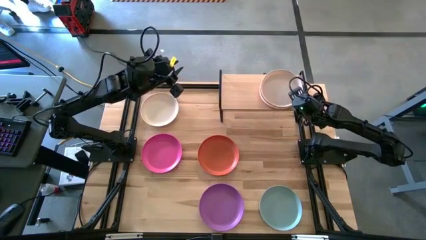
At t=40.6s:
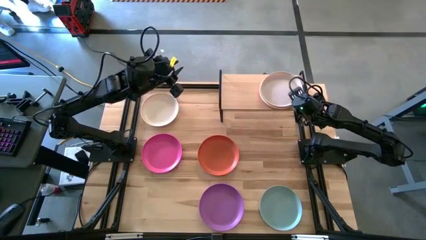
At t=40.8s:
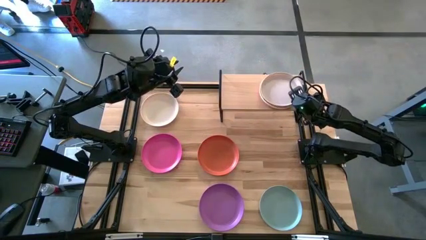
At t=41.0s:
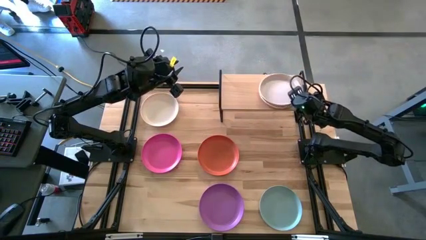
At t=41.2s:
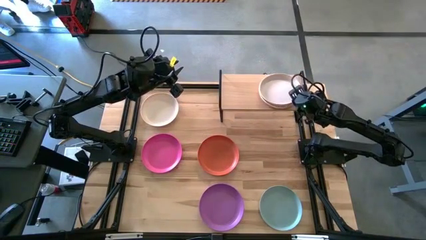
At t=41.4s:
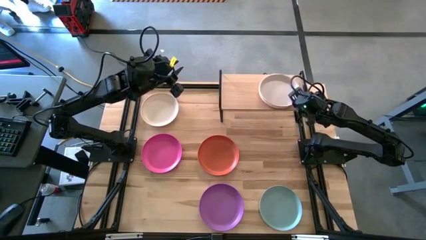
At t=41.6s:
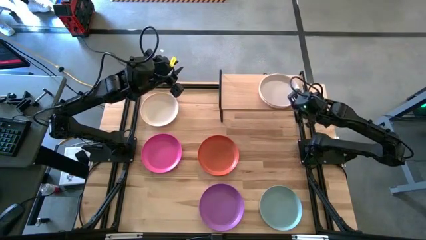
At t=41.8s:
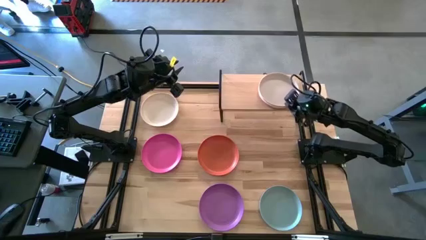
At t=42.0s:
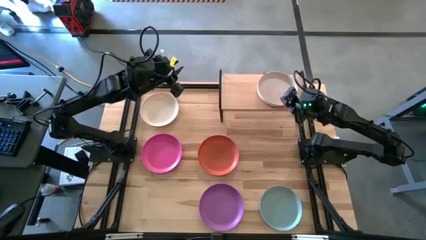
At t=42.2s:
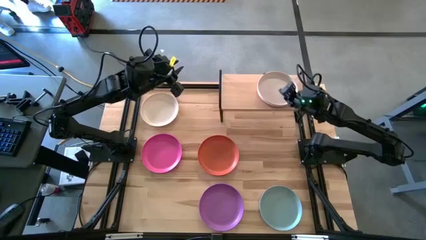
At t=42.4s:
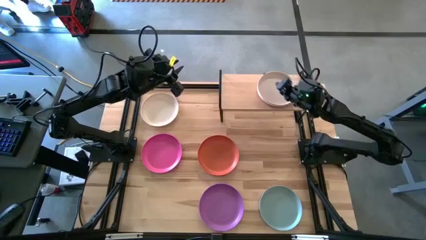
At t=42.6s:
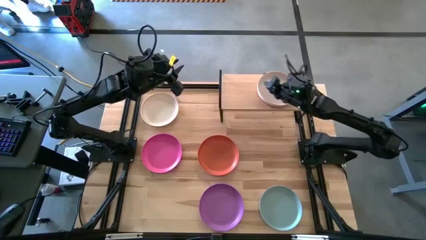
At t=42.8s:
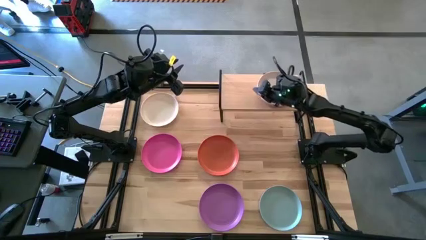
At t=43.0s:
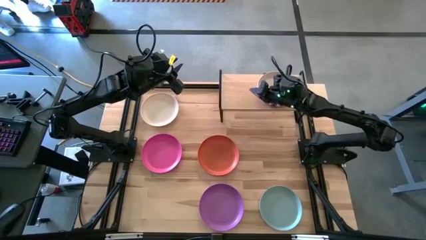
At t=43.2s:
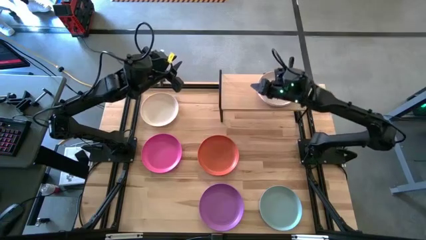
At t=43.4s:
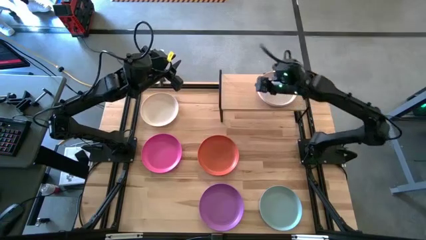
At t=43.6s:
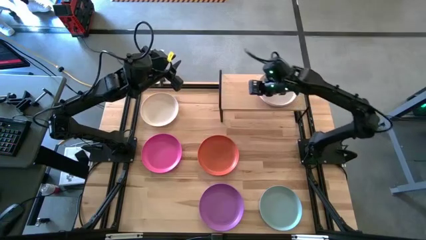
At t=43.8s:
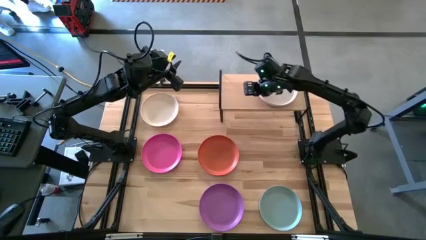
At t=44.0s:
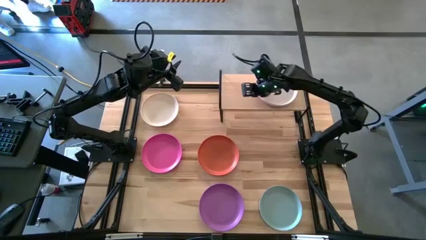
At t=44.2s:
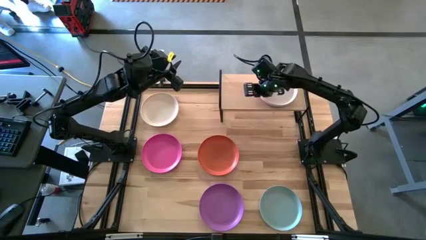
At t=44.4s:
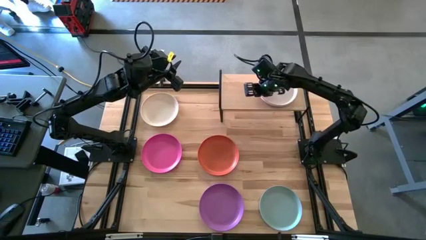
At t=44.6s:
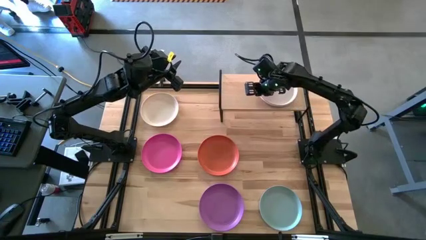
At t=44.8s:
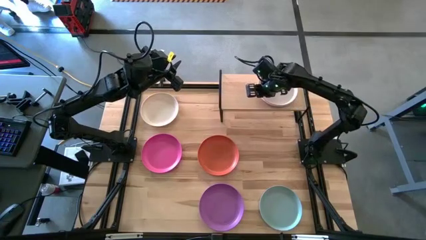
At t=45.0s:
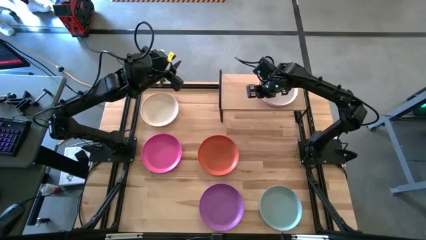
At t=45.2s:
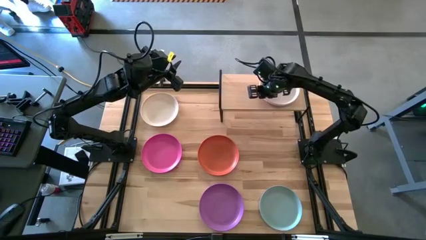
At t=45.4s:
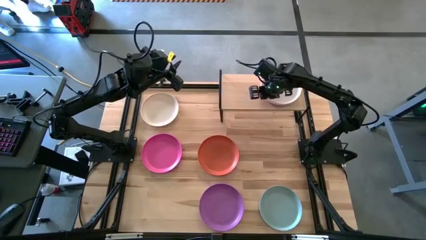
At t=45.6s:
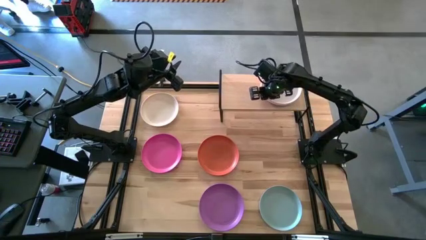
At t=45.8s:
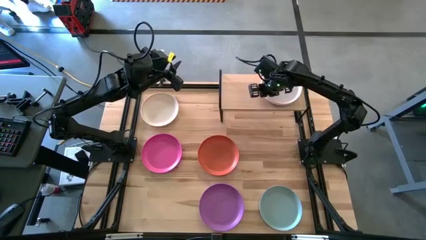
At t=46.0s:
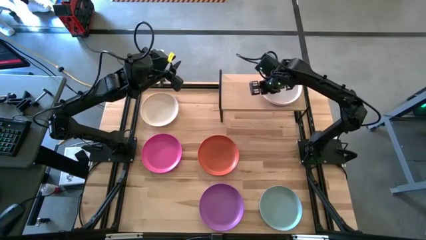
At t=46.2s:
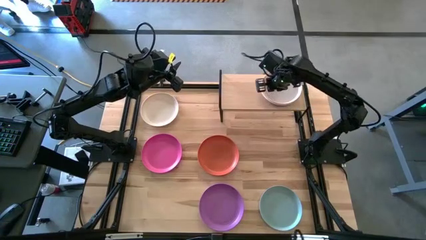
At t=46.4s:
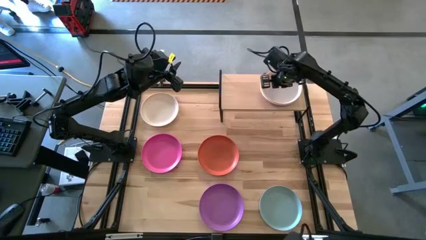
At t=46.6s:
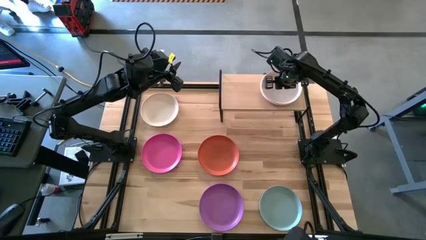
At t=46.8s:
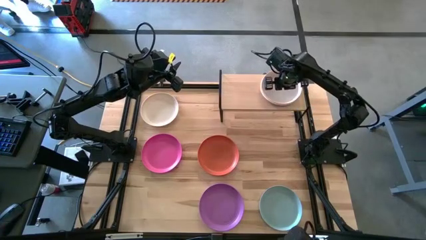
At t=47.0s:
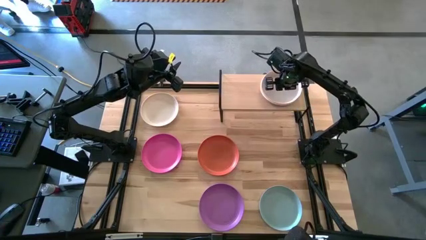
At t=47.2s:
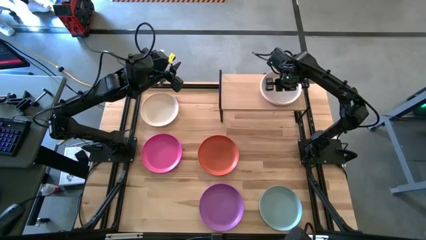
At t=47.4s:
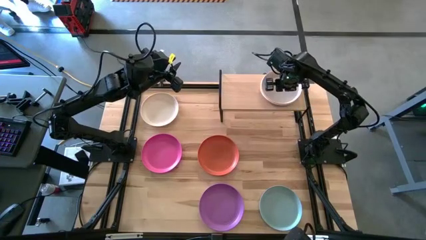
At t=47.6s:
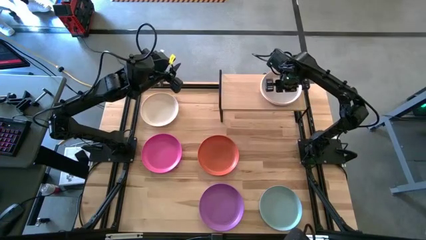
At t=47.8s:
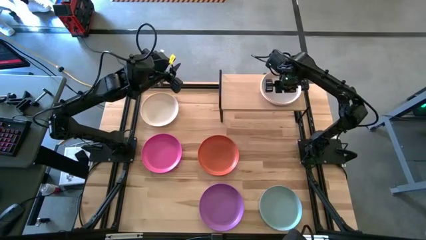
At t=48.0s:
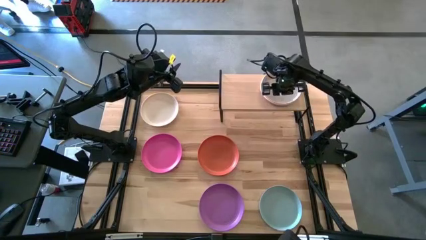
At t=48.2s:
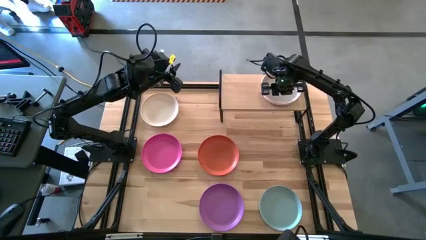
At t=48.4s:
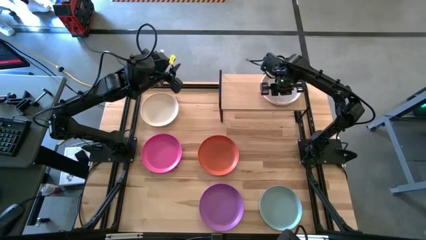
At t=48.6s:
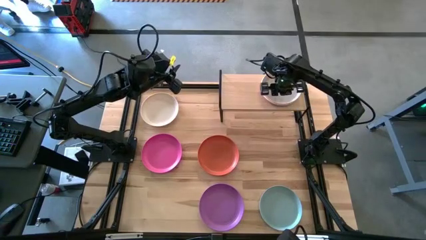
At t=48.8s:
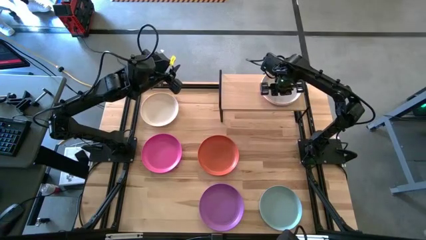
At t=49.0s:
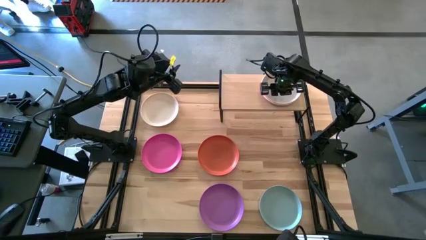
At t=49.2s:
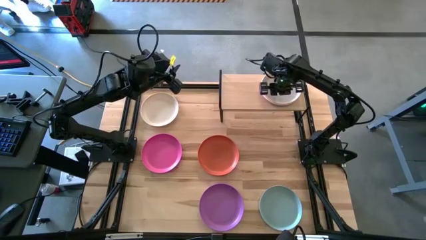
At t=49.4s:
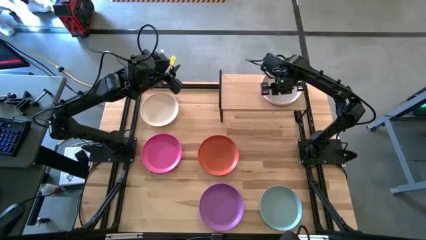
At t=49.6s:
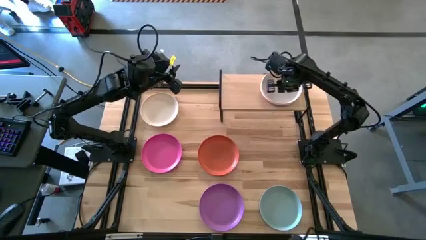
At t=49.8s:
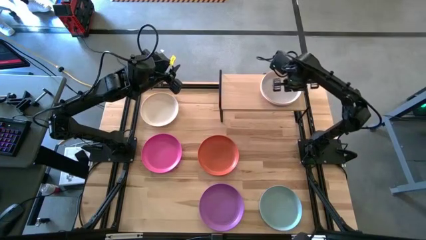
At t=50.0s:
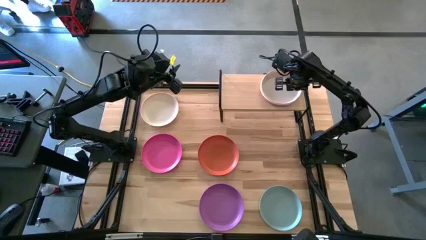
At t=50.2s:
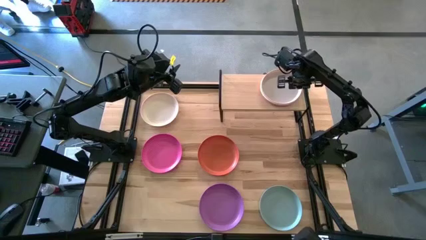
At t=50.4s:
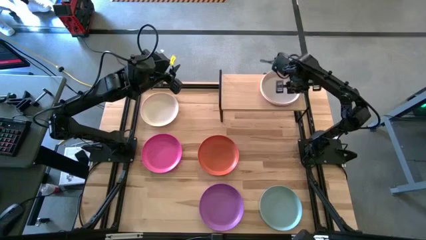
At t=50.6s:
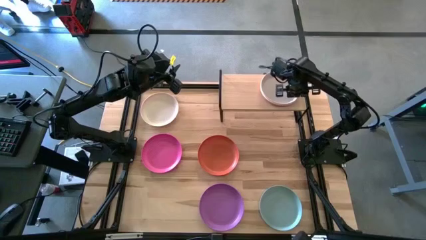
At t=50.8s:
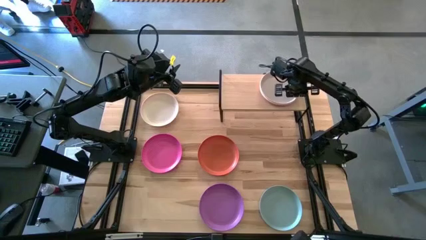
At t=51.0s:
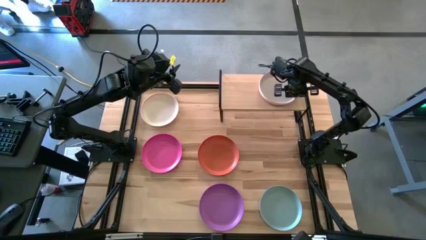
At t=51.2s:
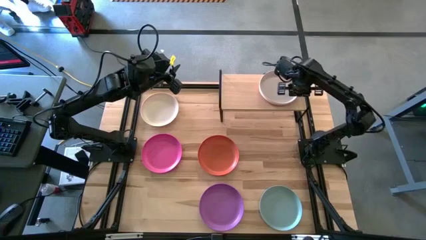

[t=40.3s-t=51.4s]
Task: Place and stack plates onto a shelf
Stack the gray plate on top of the light yellow plate on the shelf

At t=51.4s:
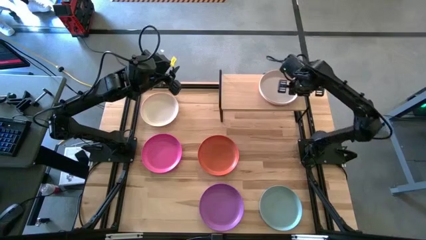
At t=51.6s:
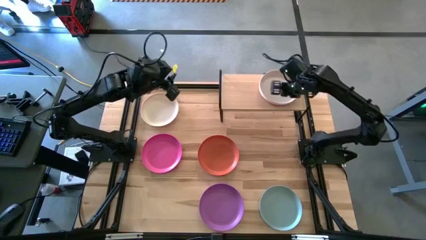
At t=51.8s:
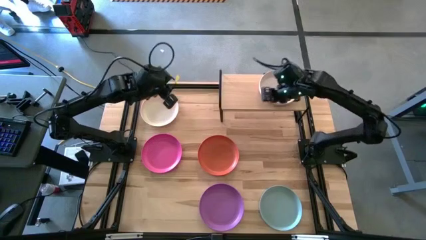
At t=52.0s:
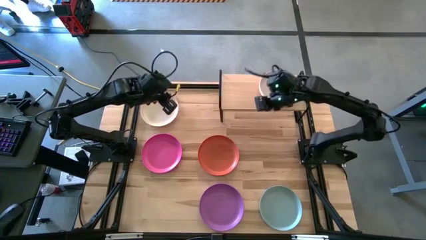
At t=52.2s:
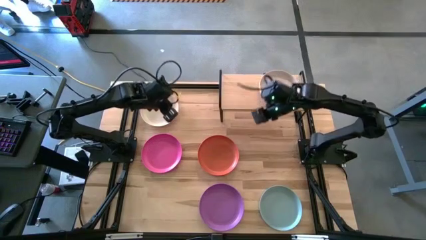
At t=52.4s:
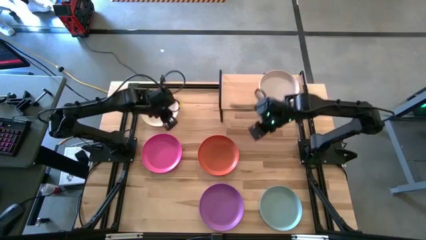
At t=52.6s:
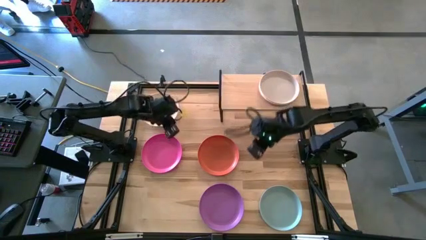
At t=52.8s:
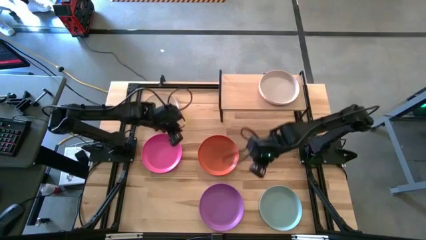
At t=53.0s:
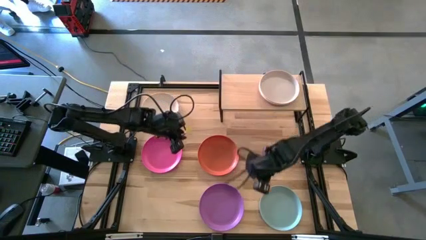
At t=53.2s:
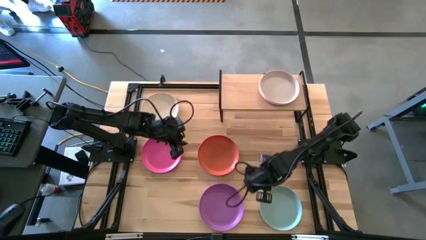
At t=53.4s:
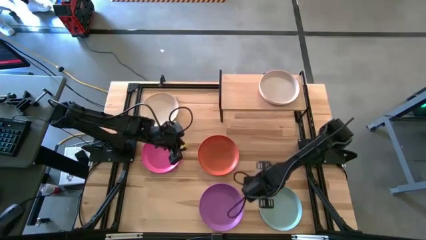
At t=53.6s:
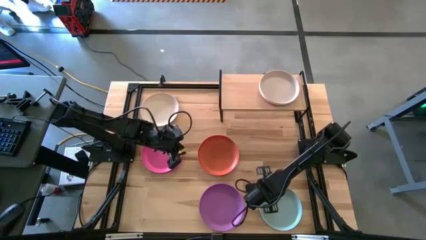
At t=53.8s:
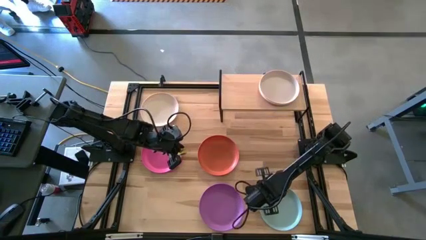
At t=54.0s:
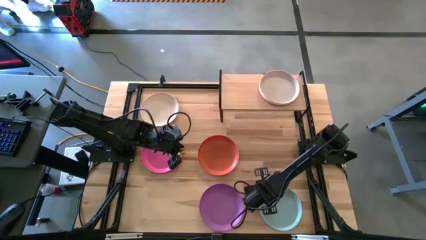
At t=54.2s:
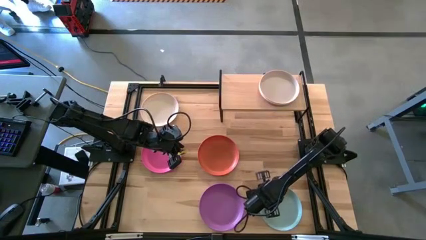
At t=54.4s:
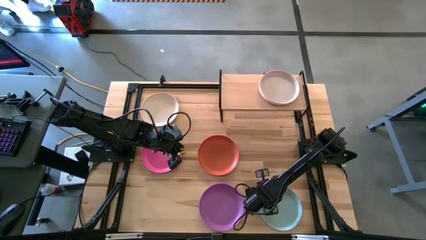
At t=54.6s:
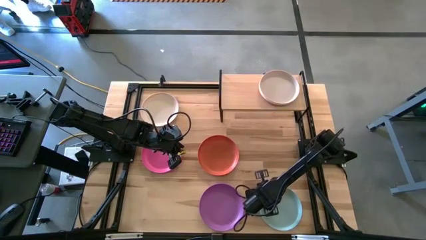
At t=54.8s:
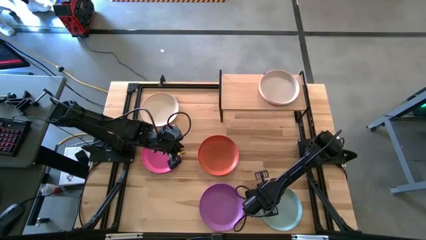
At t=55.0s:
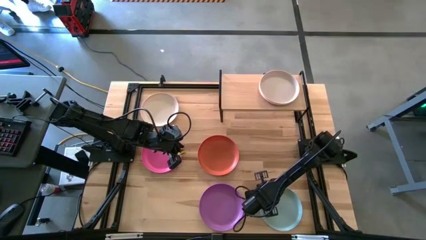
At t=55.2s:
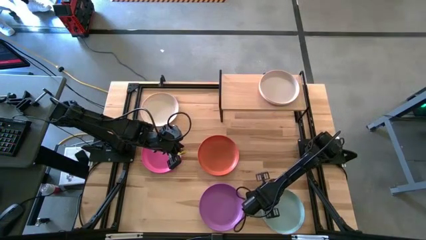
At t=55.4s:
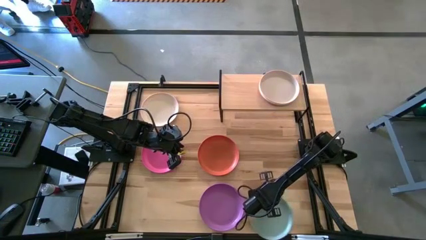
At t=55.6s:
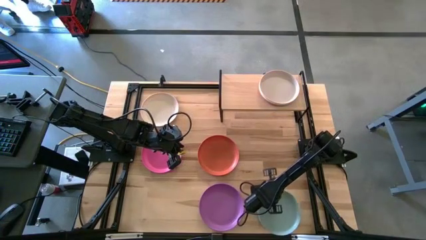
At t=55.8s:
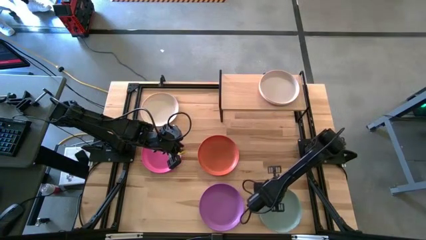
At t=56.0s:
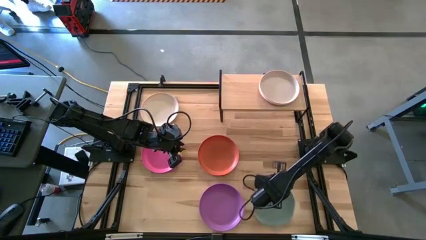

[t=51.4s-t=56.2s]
Stack the light blue plate on top of the gray plate on the shelf
